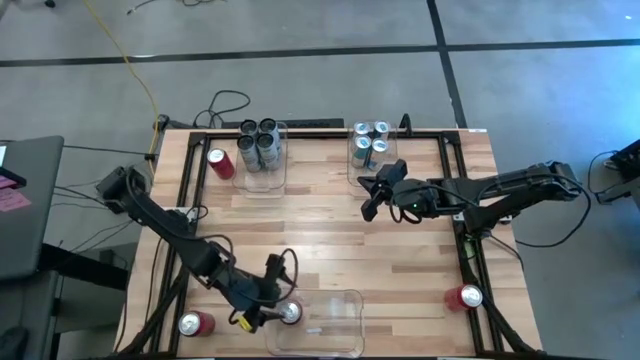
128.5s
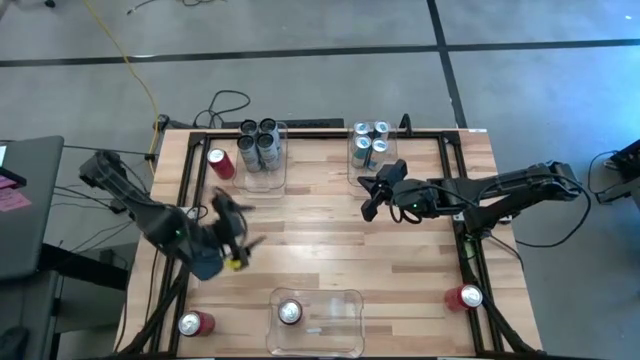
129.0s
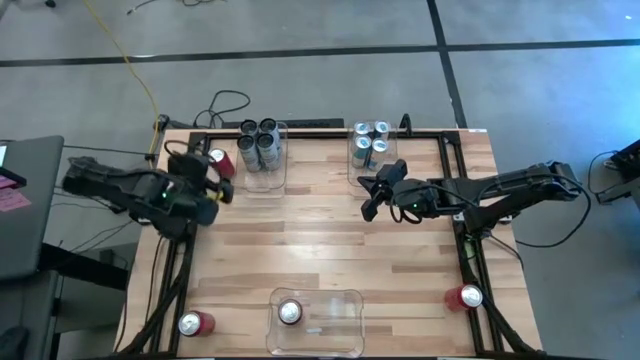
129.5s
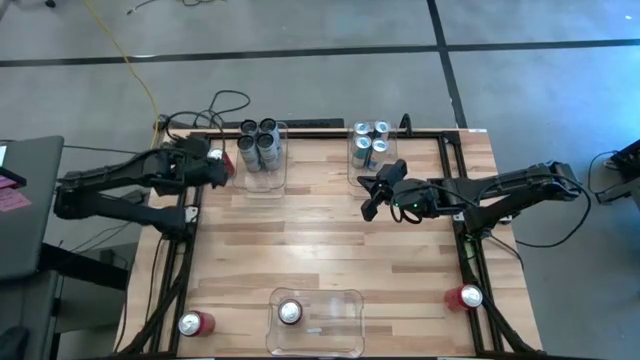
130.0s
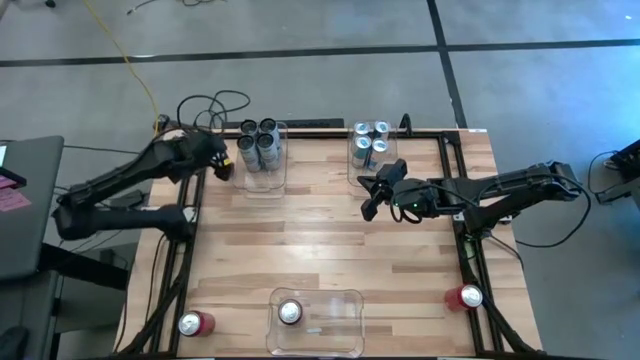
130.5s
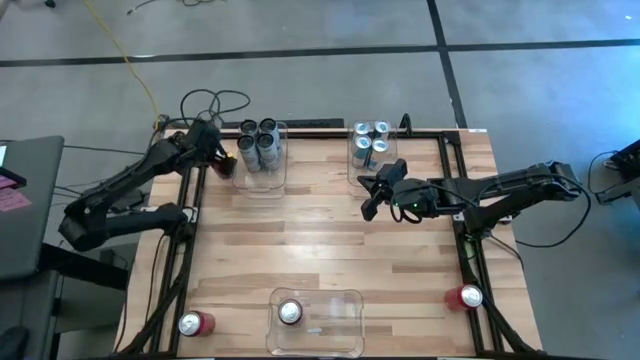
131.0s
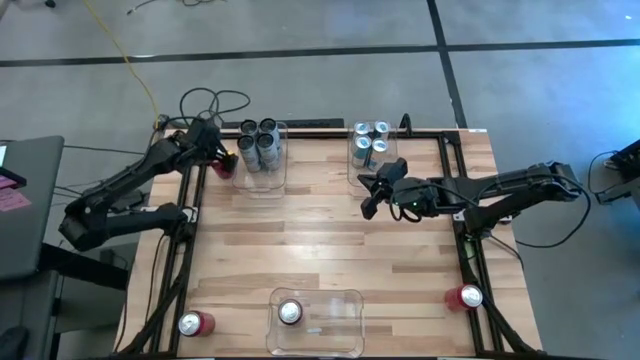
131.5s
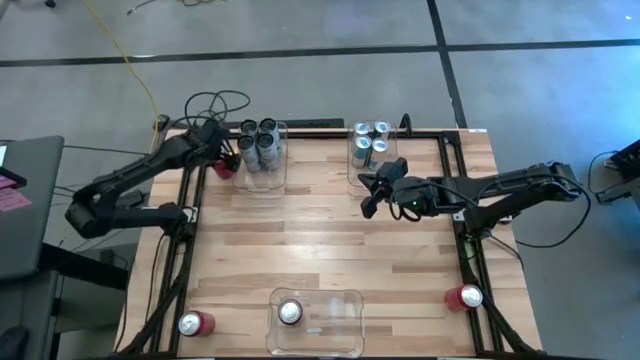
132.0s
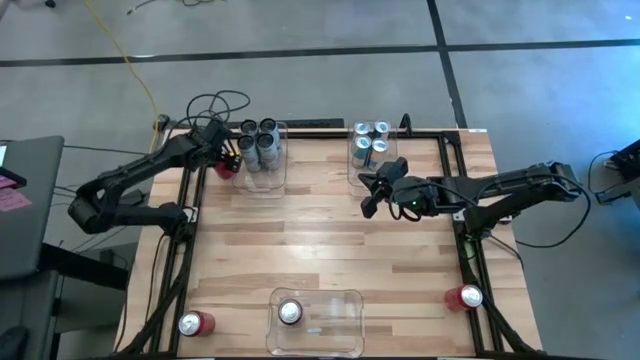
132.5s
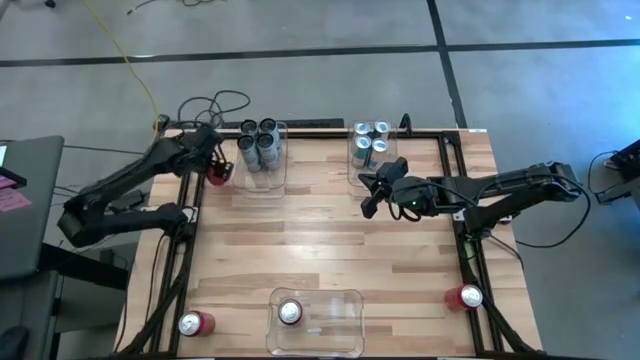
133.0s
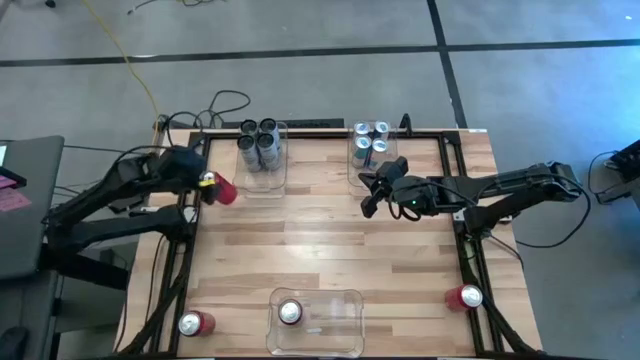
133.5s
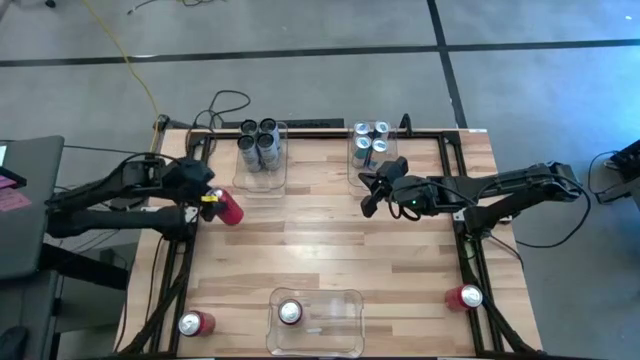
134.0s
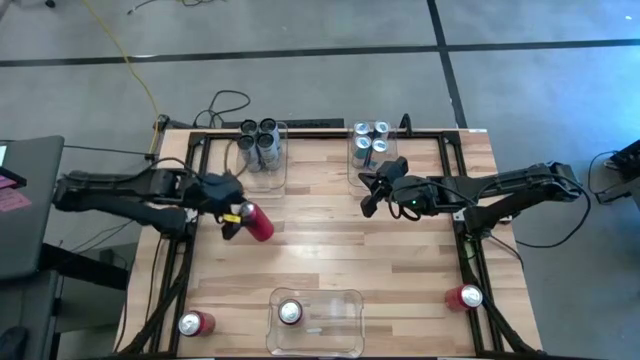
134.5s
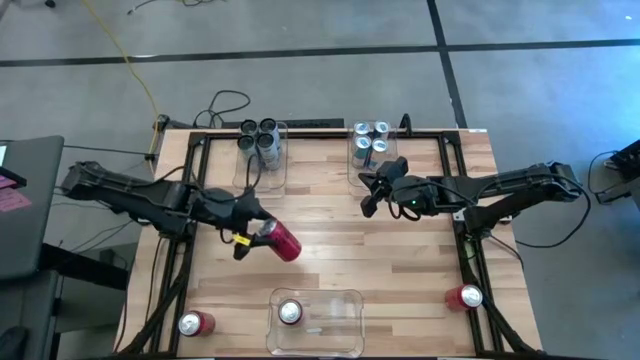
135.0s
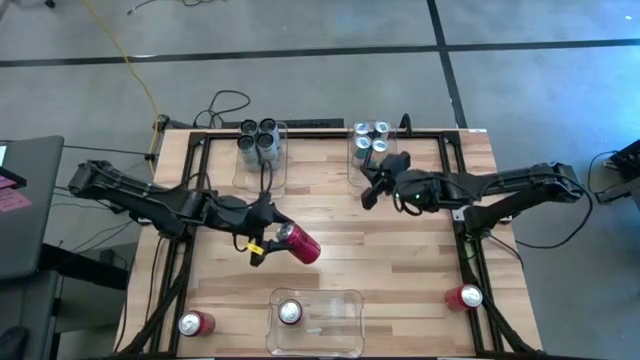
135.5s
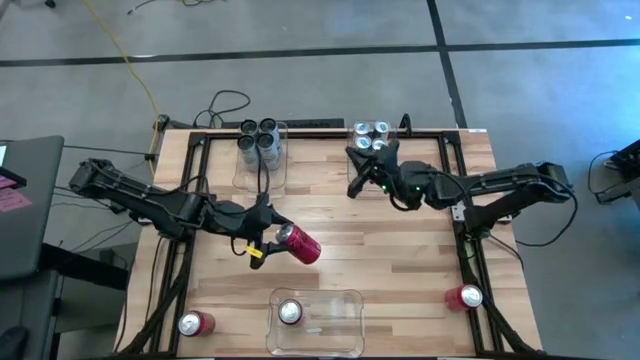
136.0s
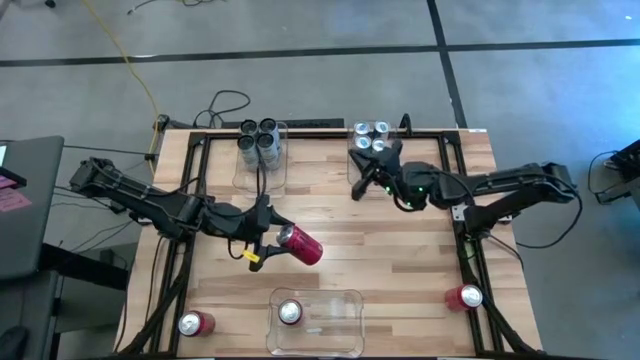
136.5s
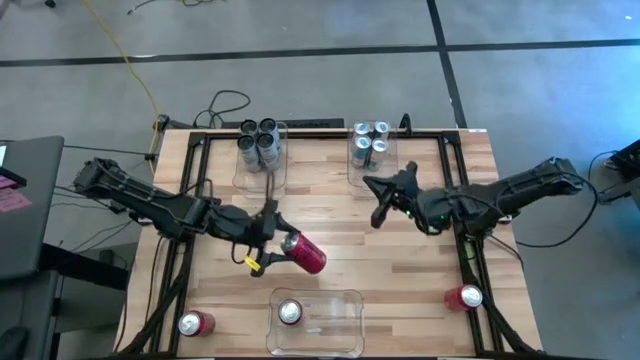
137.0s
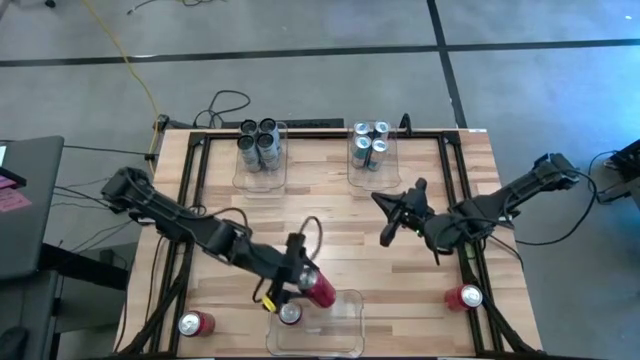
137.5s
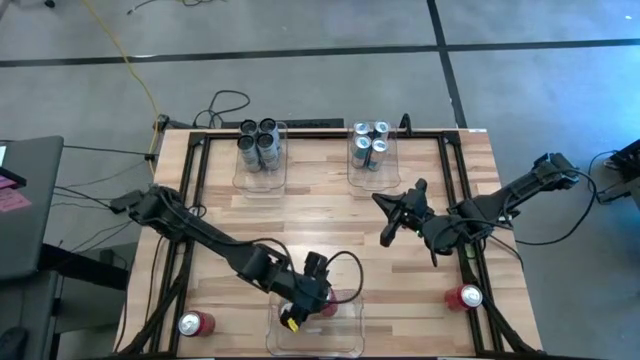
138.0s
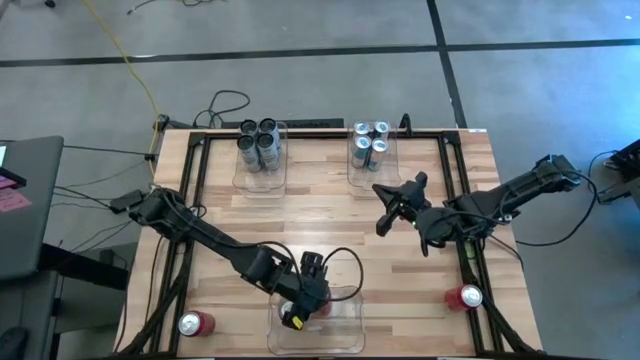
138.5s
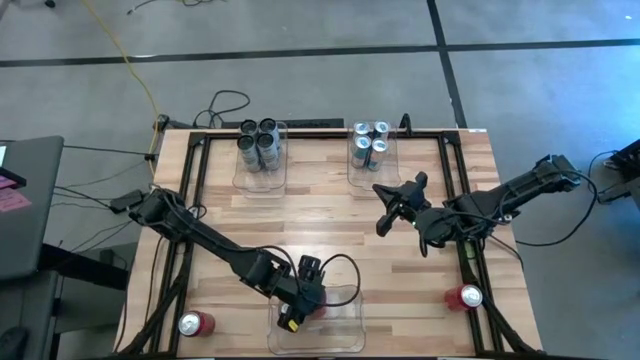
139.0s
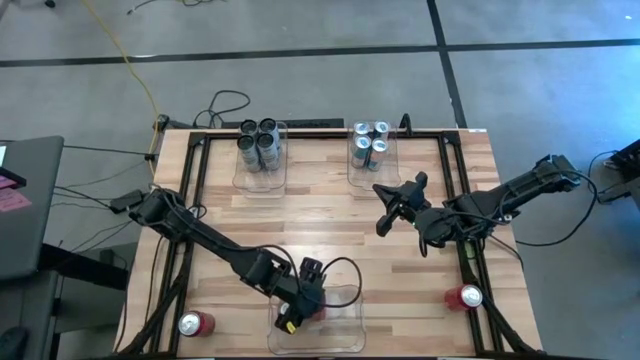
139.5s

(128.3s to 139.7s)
Task: Sort soda cans
Put the top left red and black soda can into the bottom transparent bin

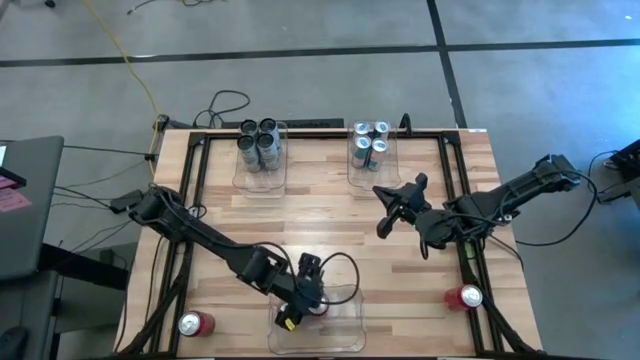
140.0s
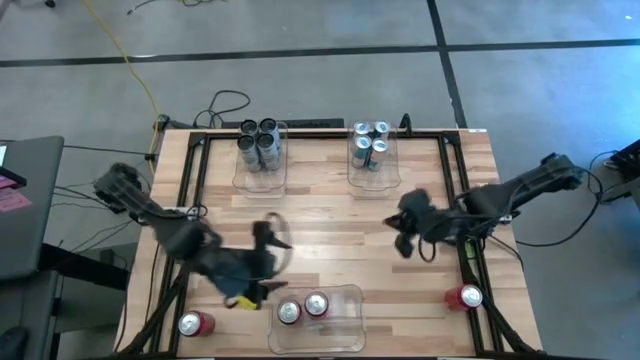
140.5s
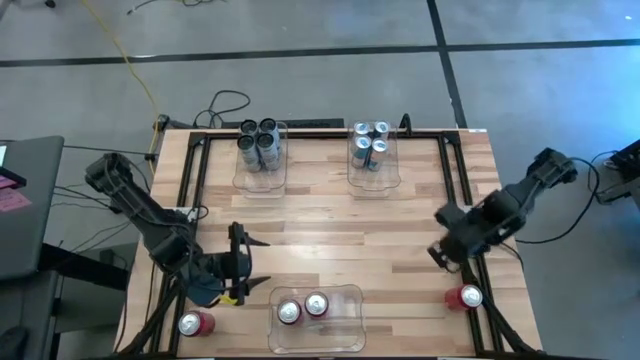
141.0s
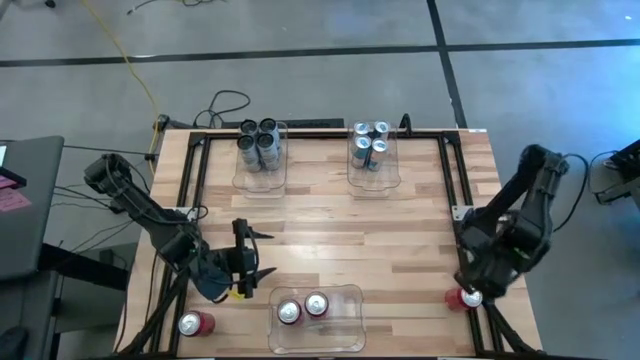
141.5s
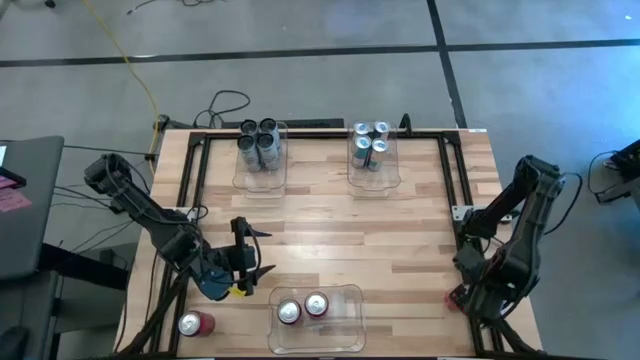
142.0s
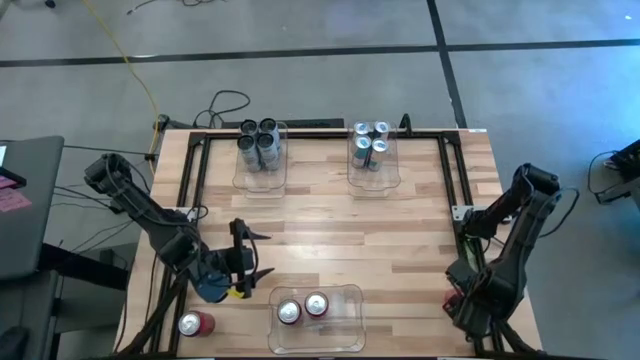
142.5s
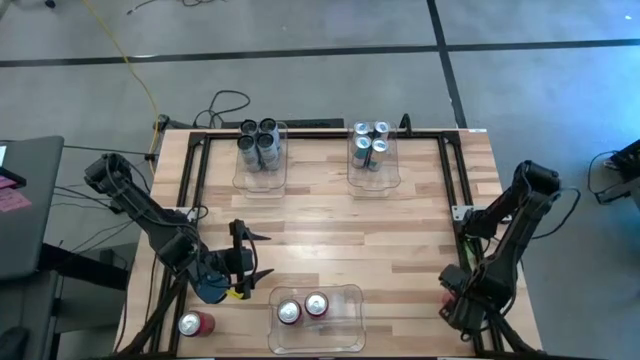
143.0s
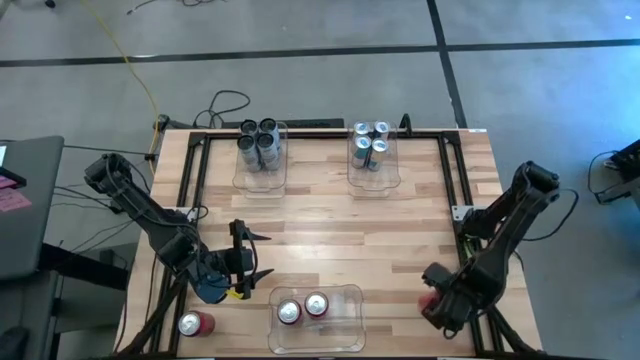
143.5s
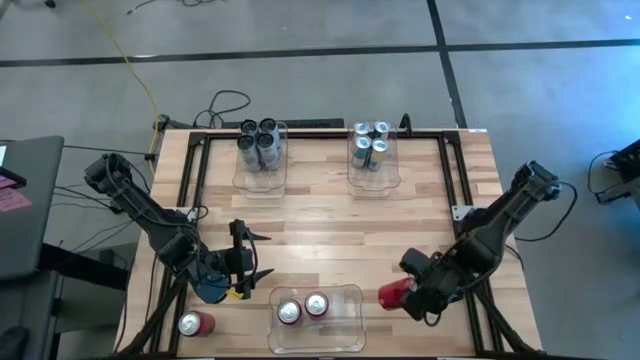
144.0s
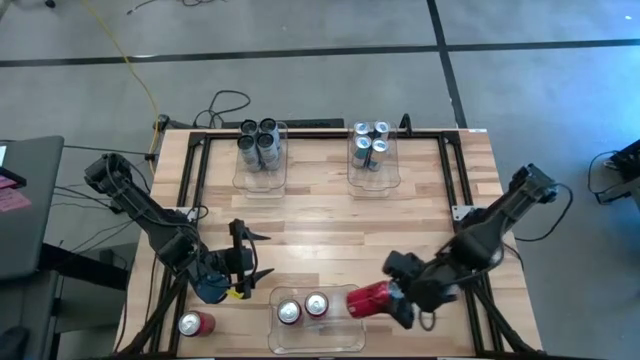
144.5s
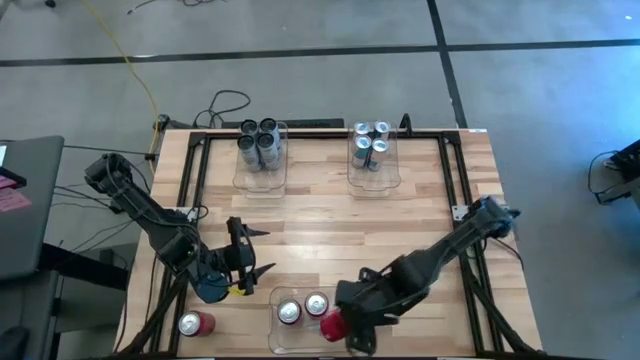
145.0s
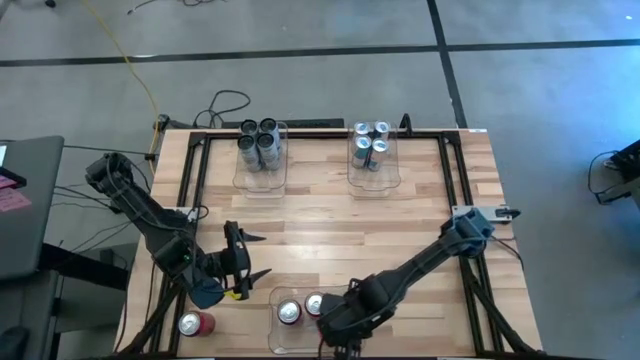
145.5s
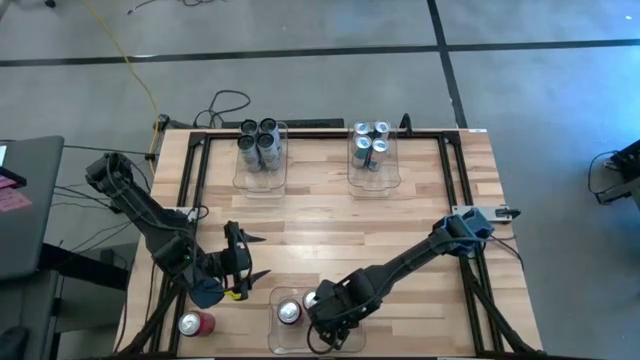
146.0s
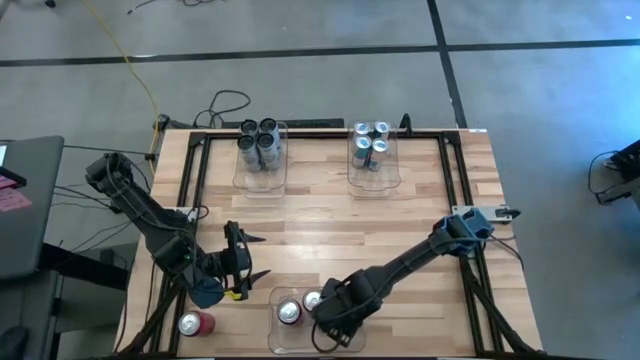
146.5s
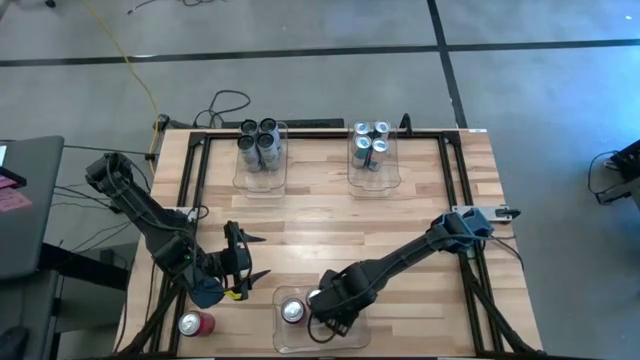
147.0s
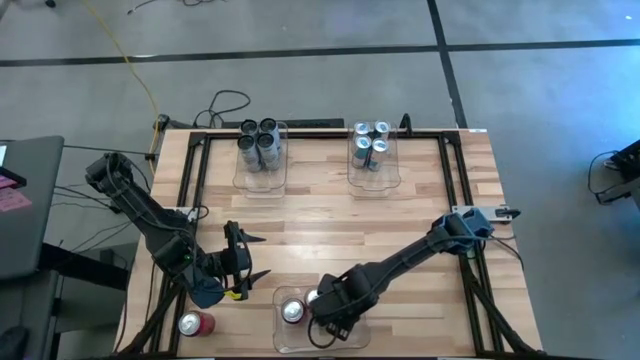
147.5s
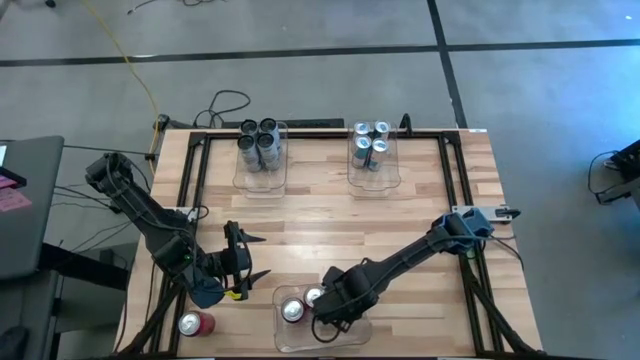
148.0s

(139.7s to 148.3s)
Put the right red and black soda can into the bottom transparent bin

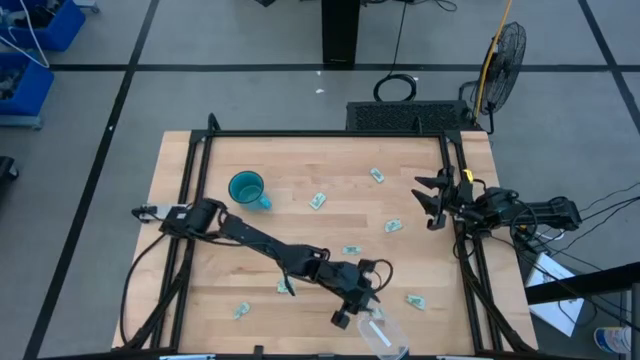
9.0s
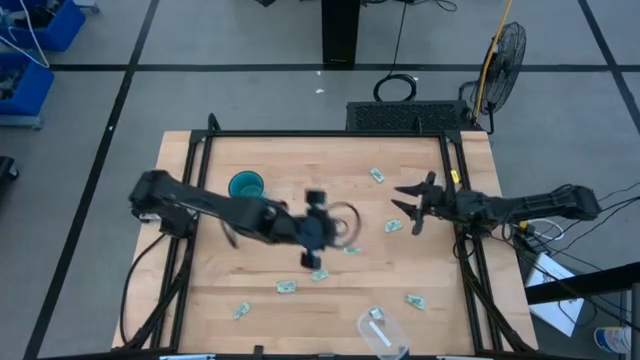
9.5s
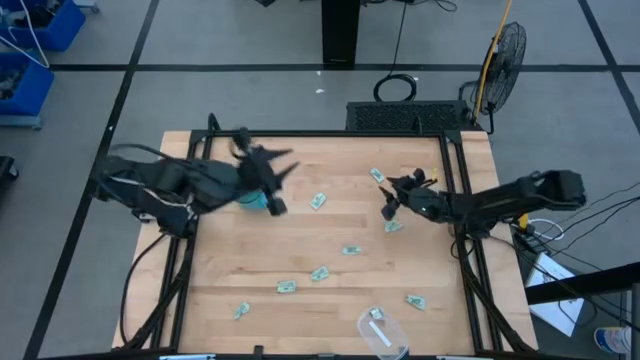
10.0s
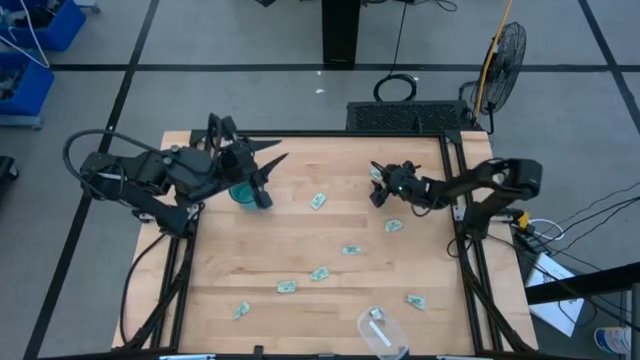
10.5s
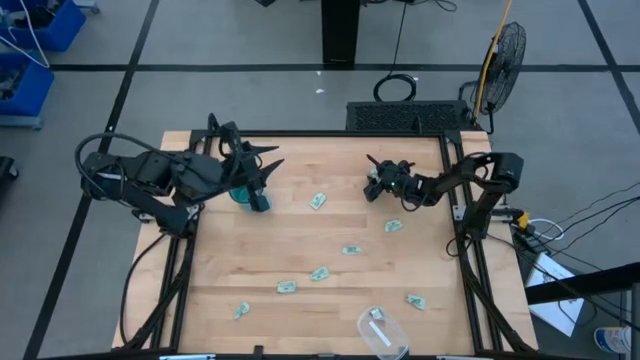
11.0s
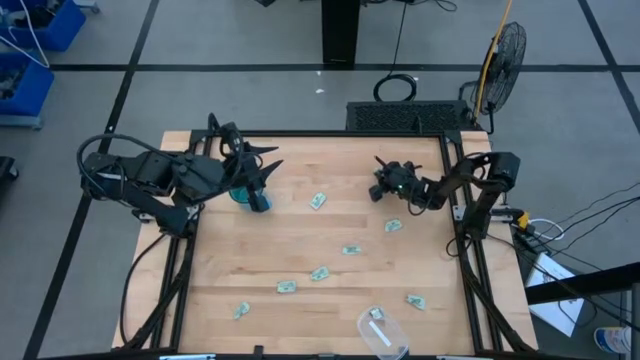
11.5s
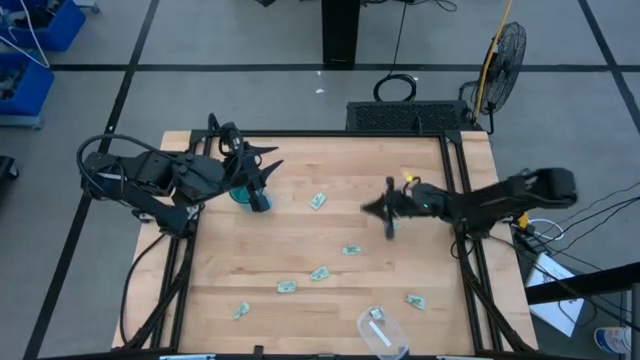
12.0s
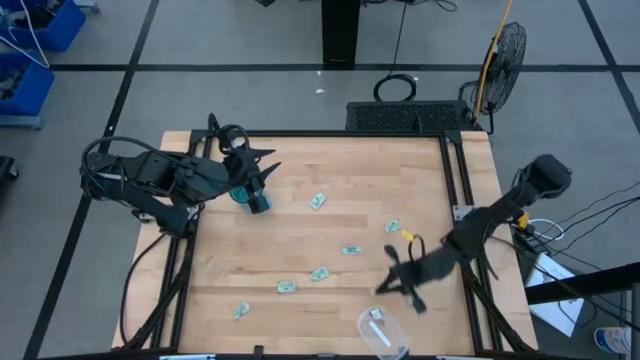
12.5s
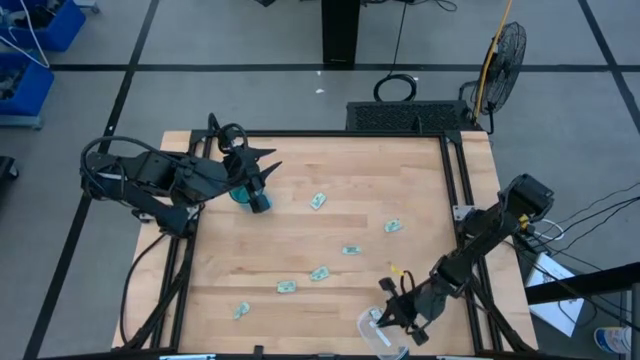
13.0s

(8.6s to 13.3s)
Task: Pick and place Stevia / Truvia into bins
Put the green stevia packet into the transparent container
